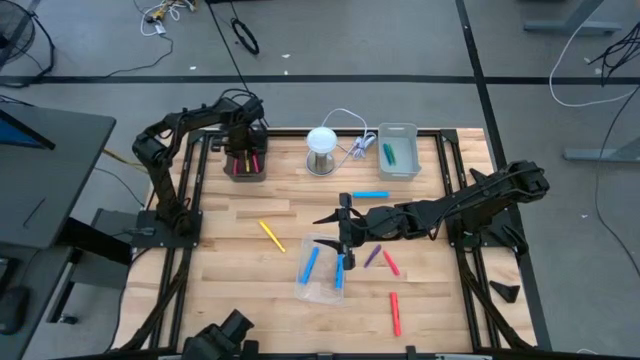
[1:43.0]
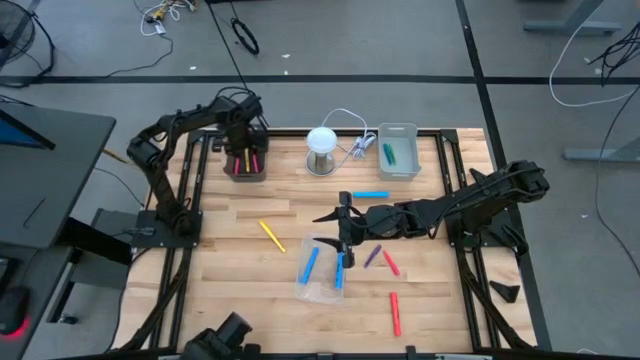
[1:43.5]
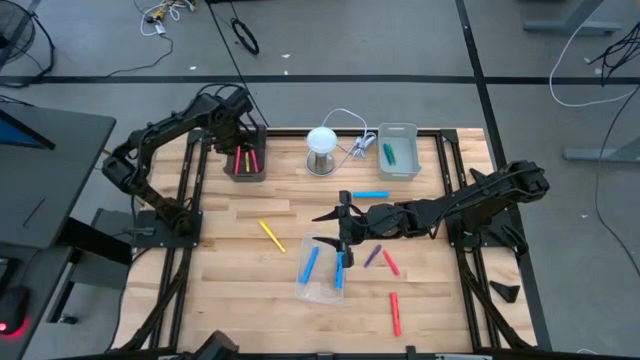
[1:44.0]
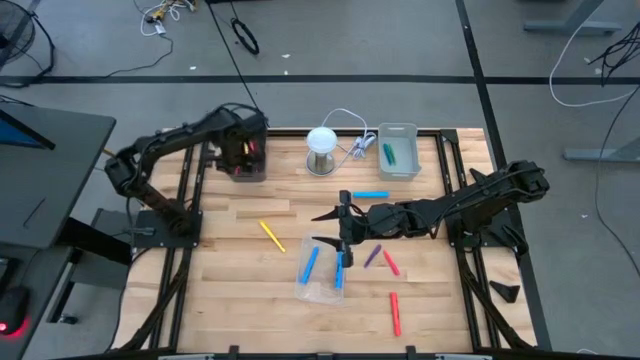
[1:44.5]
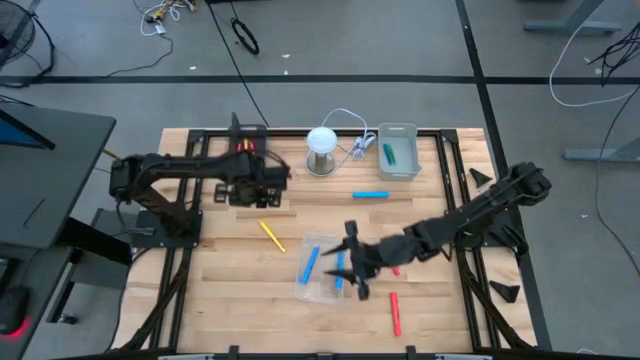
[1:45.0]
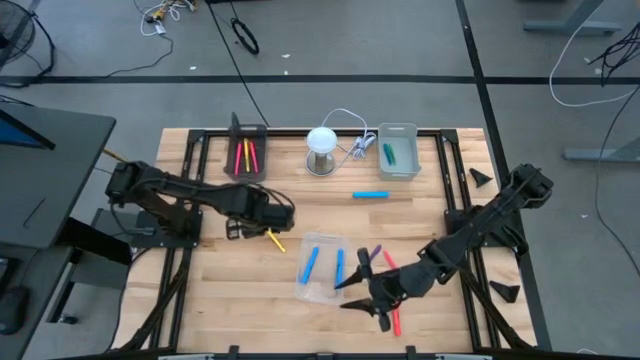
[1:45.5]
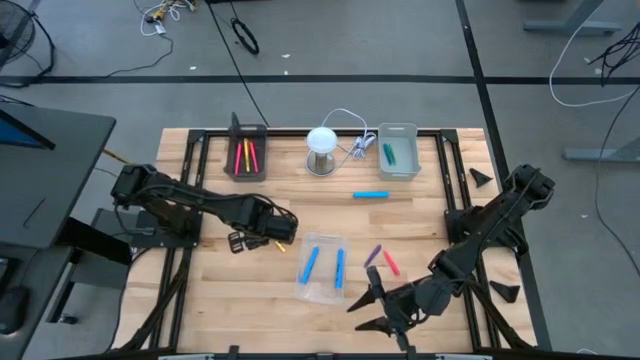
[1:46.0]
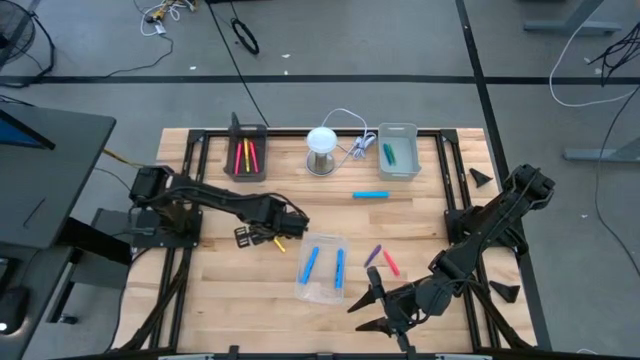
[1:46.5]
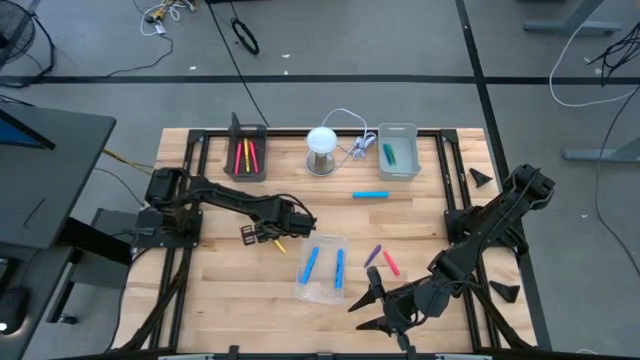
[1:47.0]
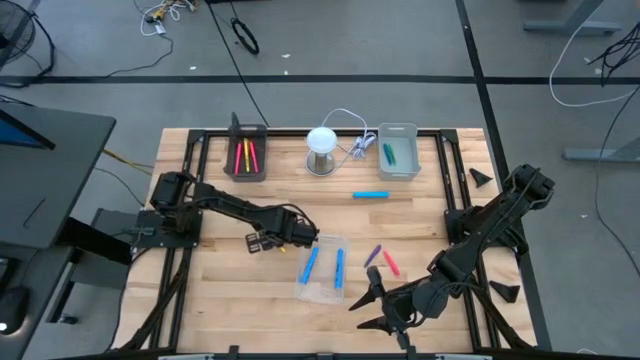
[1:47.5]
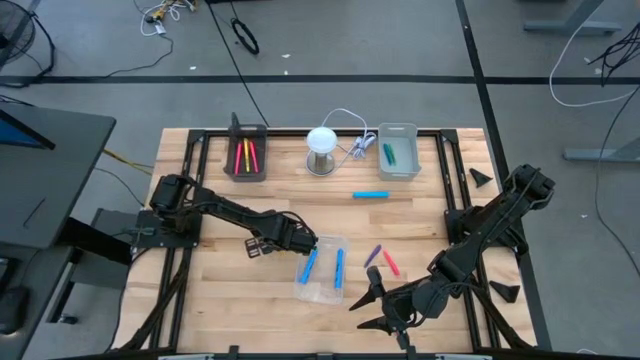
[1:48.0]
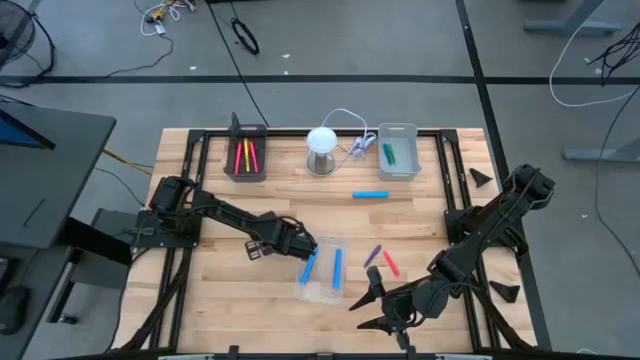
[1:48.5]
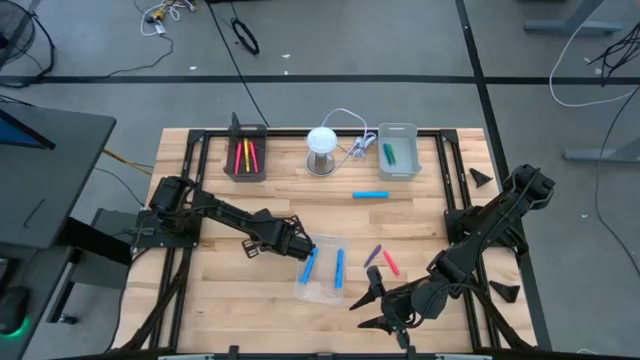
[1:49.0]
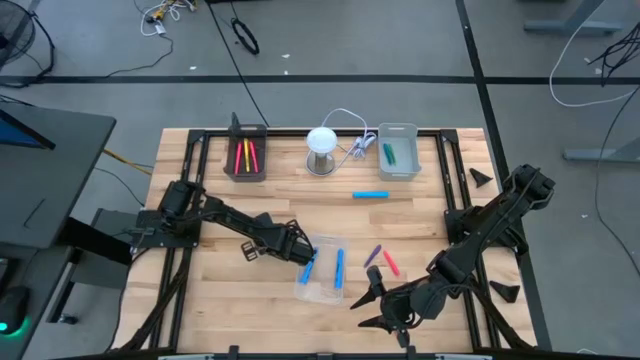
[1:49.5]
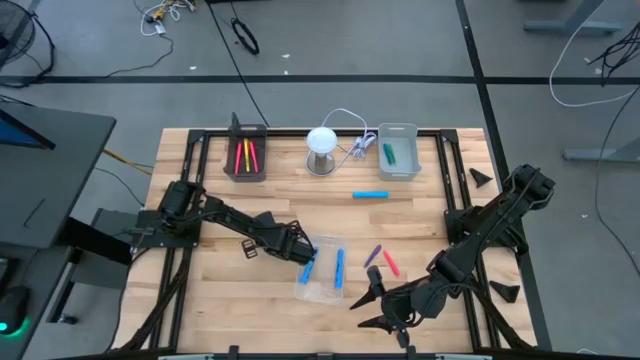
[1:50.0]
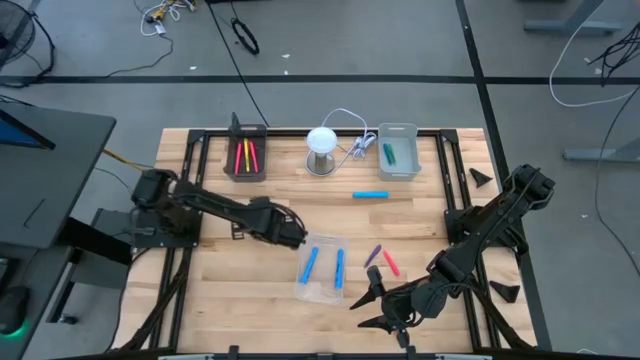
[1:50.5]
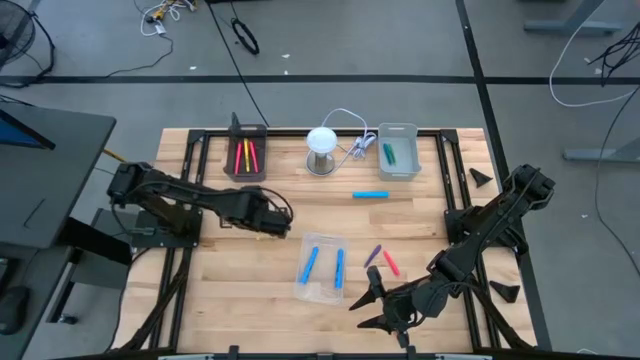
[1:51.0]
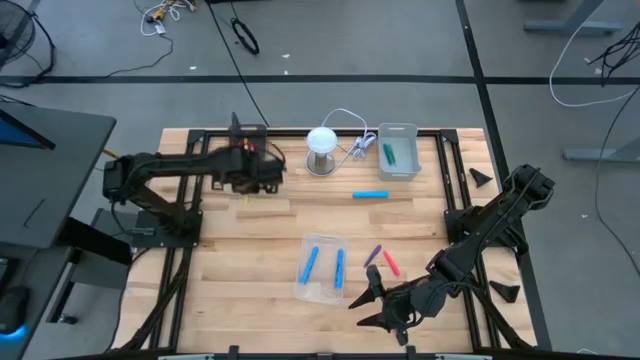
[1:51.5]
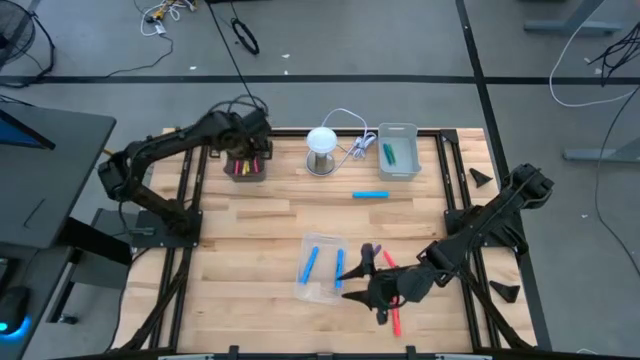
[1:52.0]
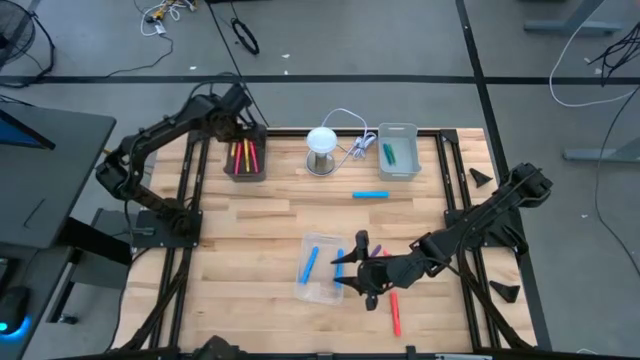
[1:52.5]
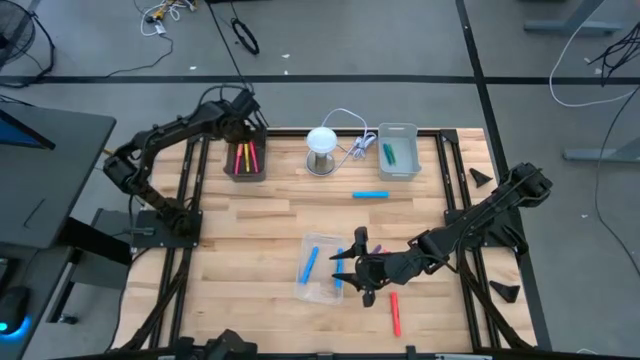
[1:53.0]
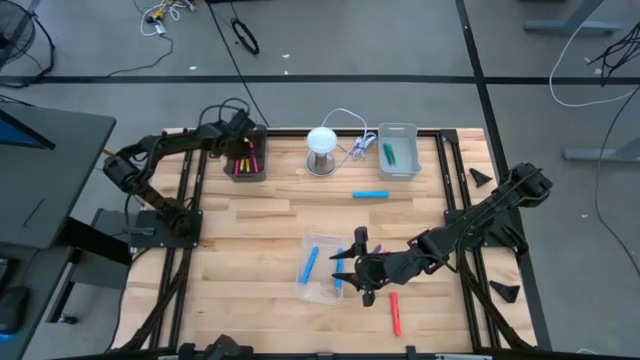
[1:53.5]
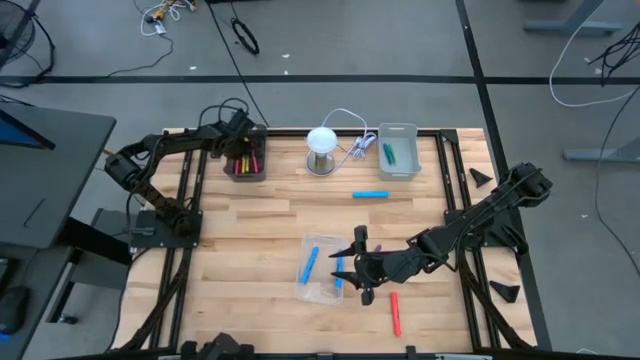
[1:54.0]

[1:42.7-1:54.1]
Task: Pick & Place Markers
Put the yellow marker into the black bin

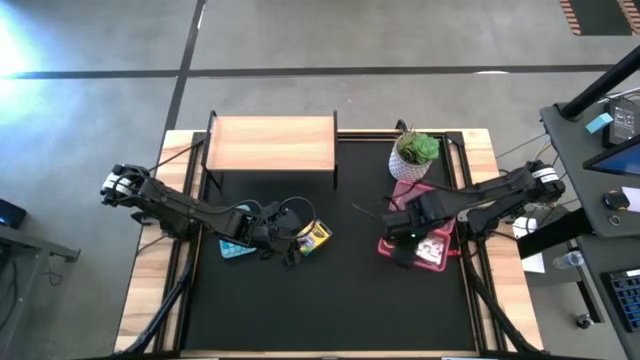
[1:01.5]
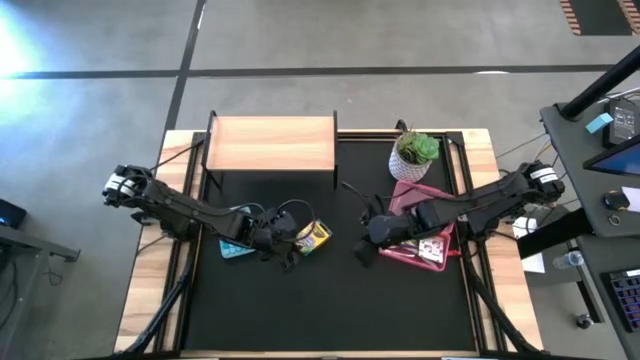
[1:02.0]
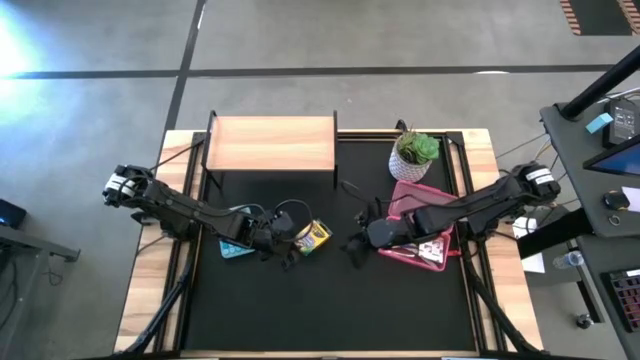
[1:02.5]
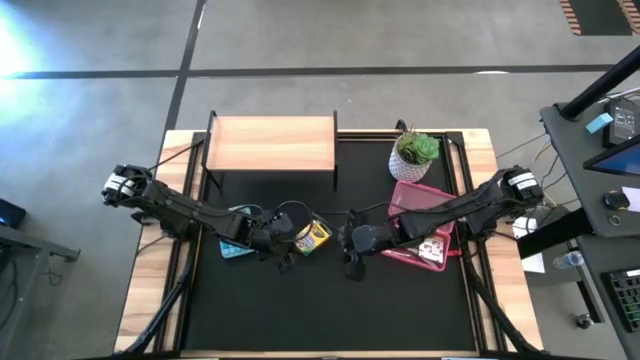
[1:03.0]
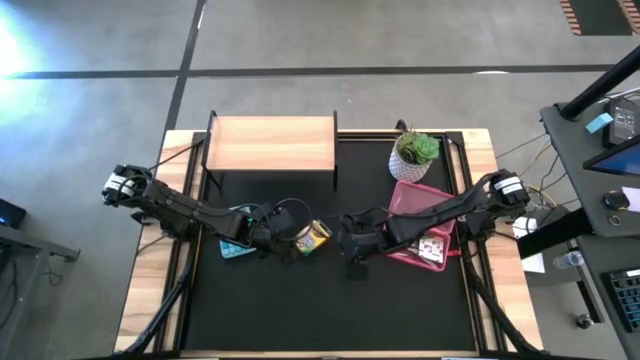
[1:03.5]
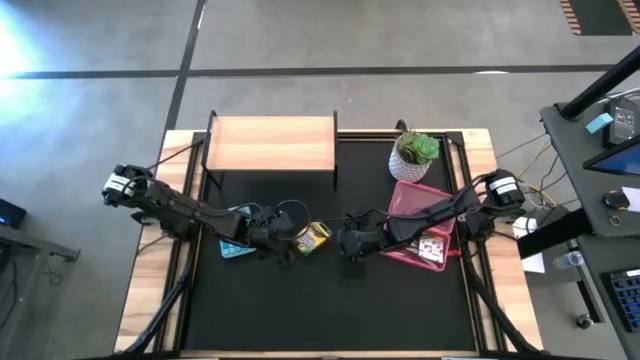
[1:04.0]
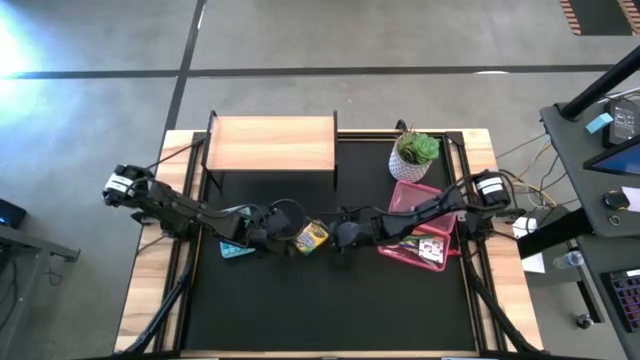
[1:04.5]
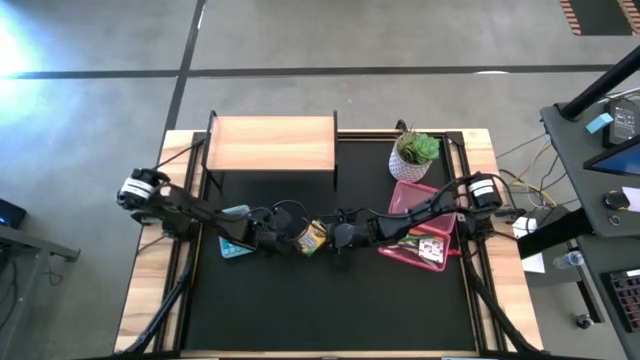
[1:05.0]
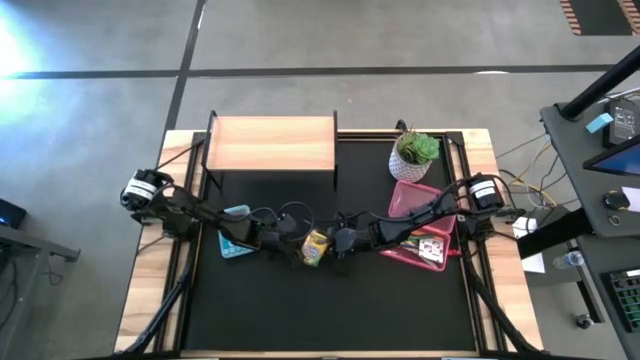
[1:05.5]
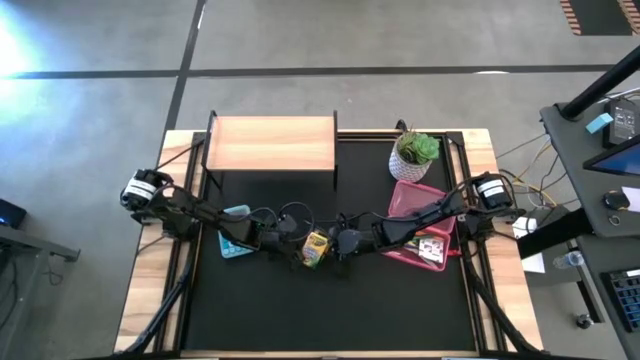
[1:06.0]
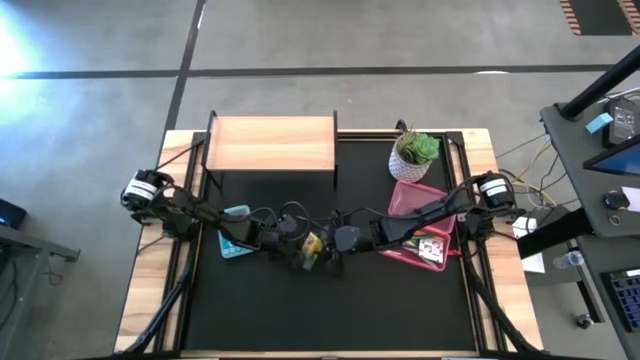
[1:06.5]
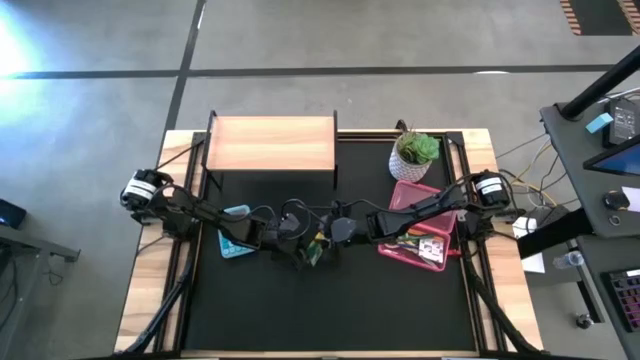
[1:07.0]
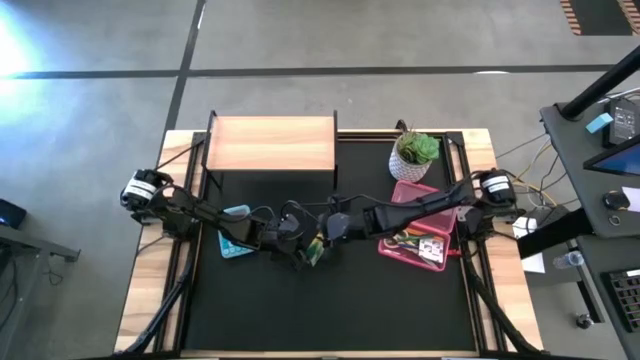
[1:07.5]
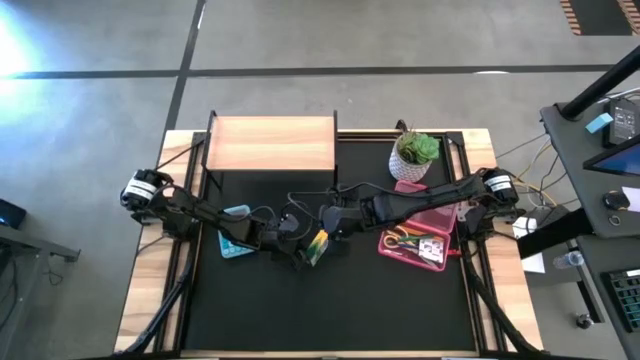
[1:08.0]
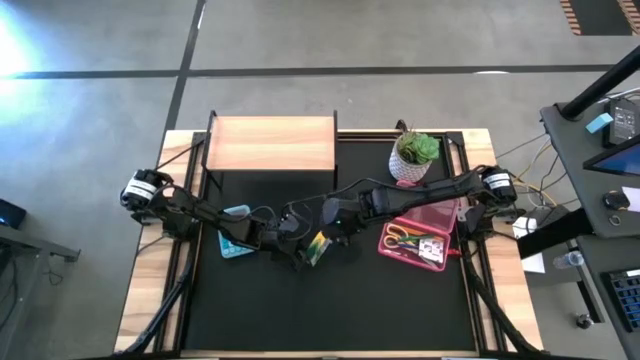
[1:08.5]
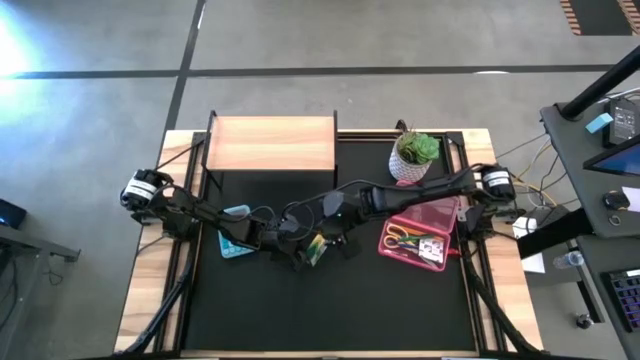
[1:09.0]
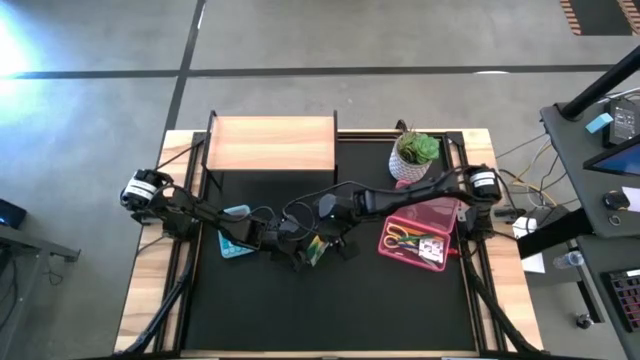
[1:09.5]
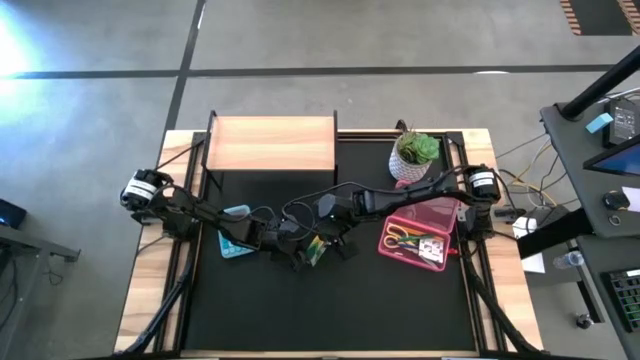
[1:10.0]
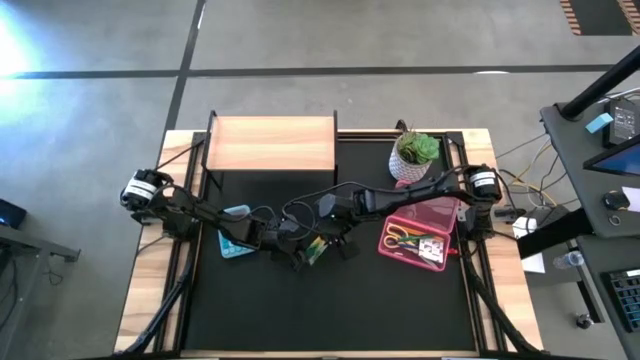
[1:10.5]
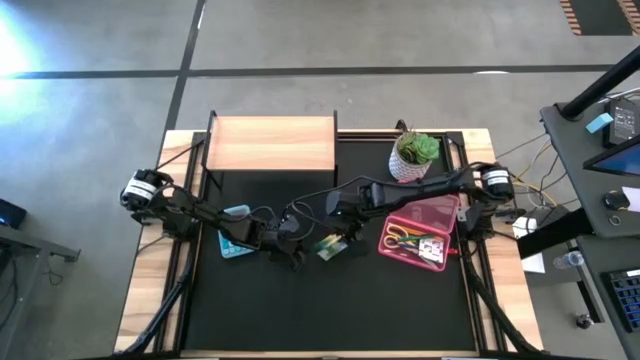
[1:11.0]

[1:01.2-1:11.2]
Task: Pack school essentials
Put the box of crayons into the pink supply box
